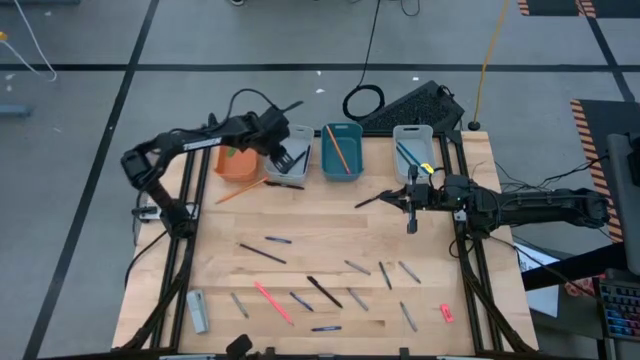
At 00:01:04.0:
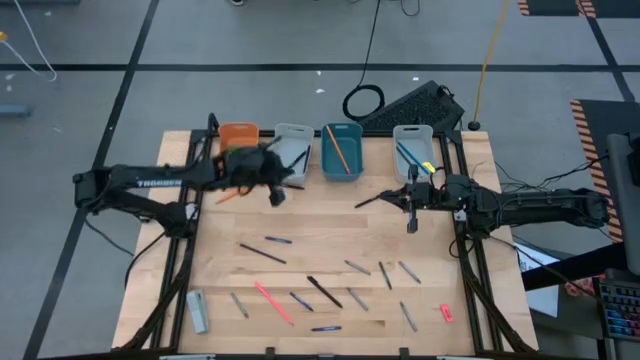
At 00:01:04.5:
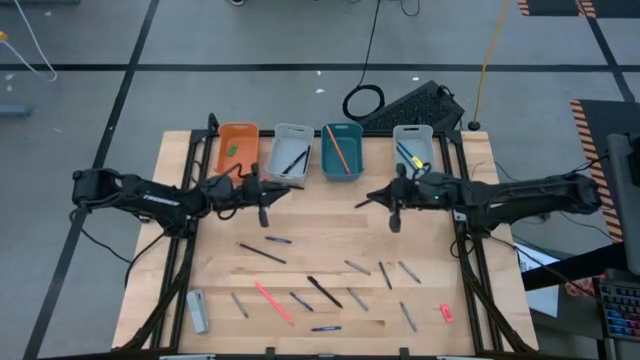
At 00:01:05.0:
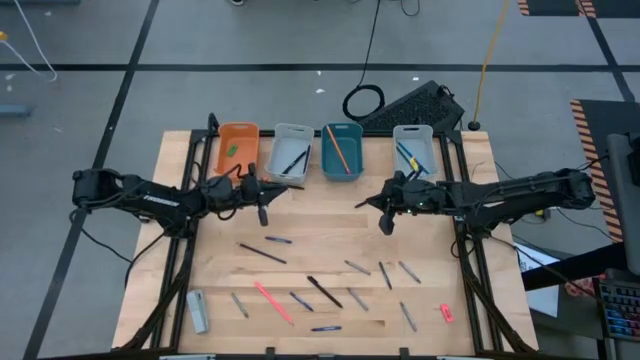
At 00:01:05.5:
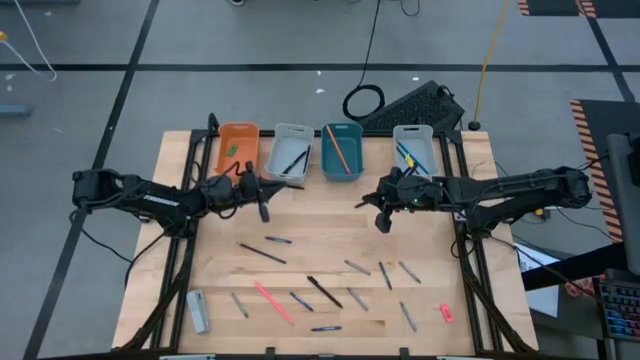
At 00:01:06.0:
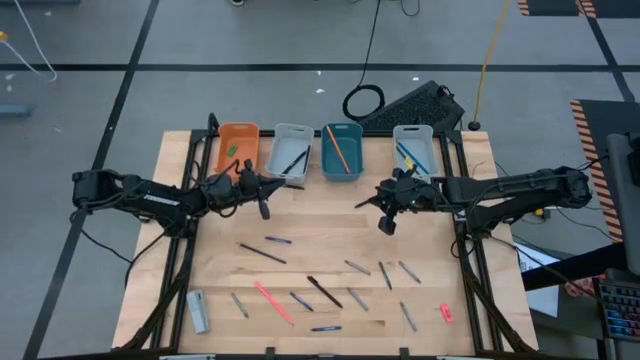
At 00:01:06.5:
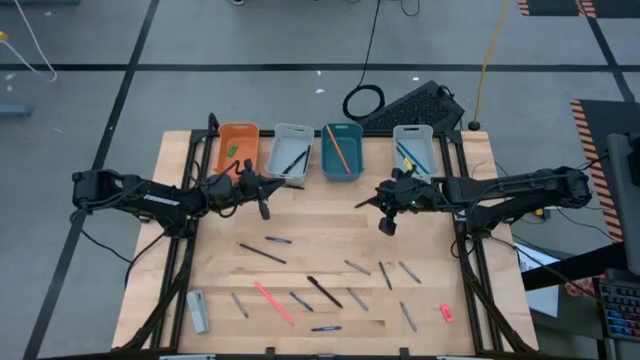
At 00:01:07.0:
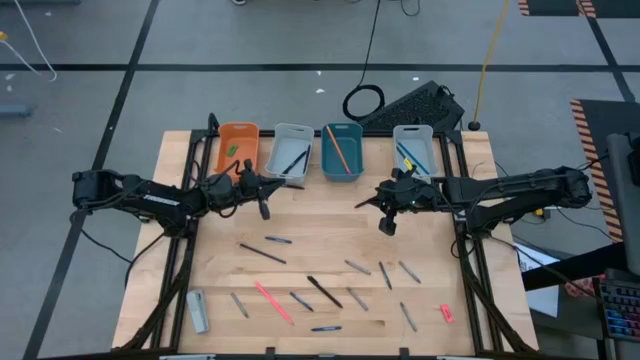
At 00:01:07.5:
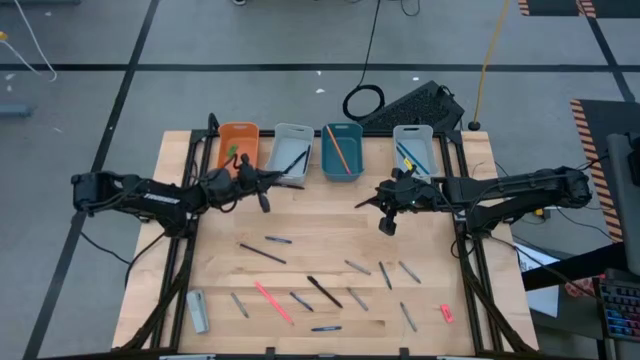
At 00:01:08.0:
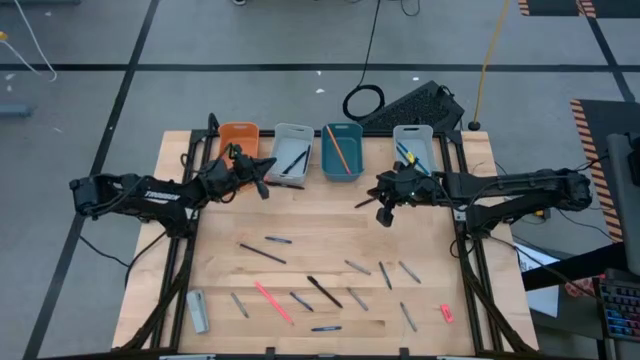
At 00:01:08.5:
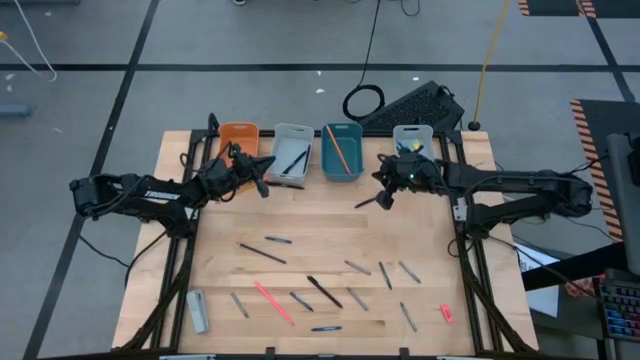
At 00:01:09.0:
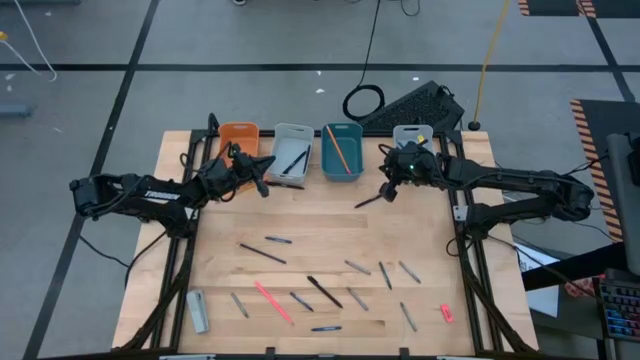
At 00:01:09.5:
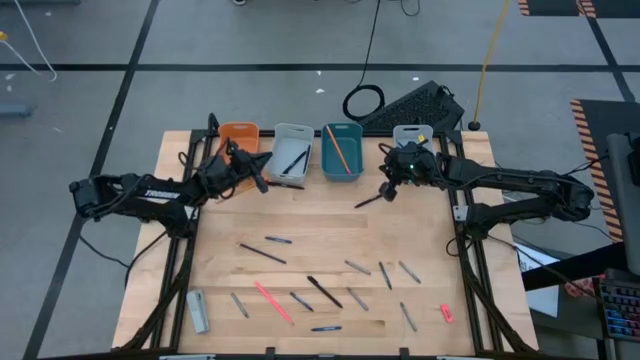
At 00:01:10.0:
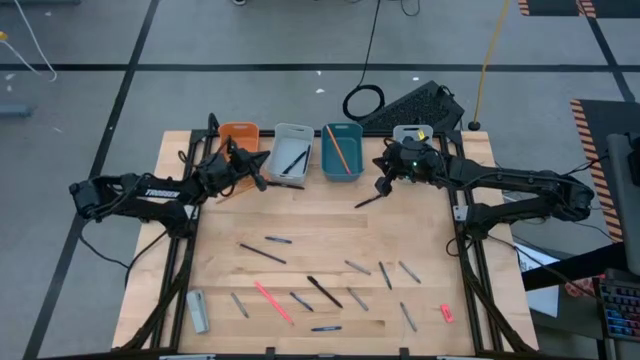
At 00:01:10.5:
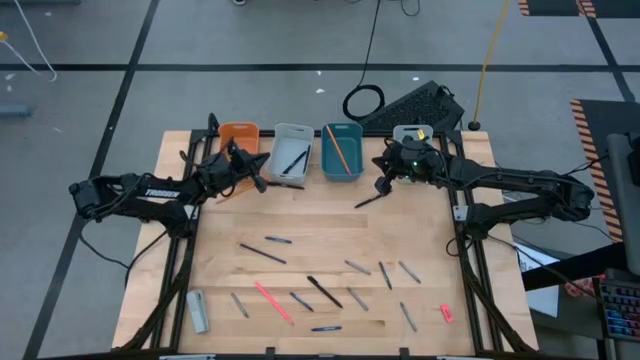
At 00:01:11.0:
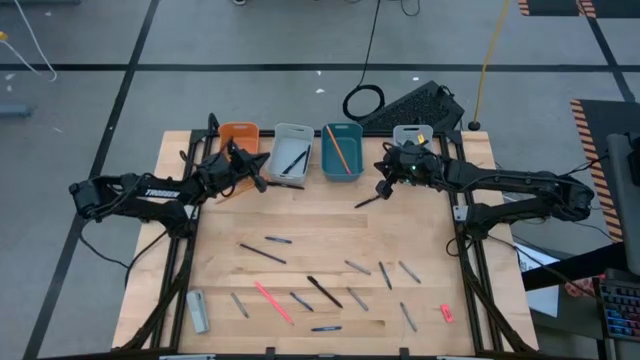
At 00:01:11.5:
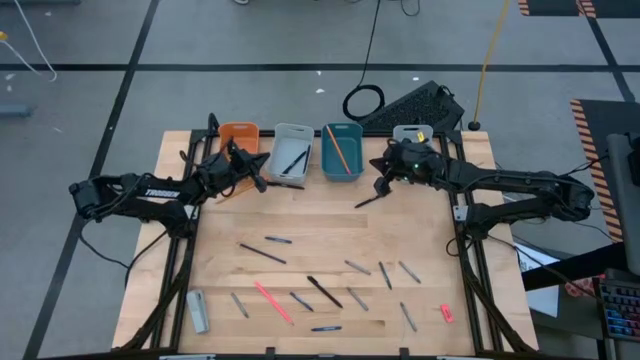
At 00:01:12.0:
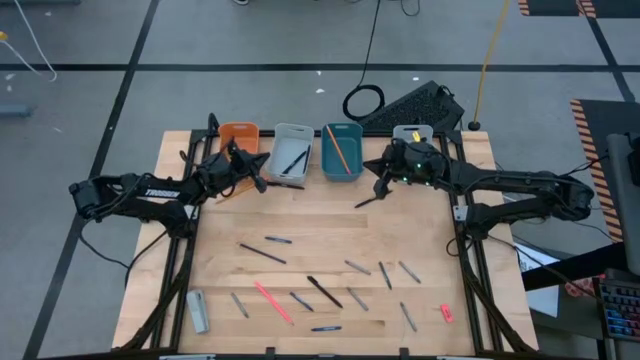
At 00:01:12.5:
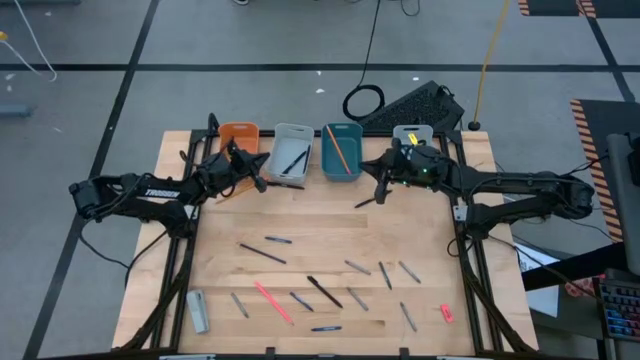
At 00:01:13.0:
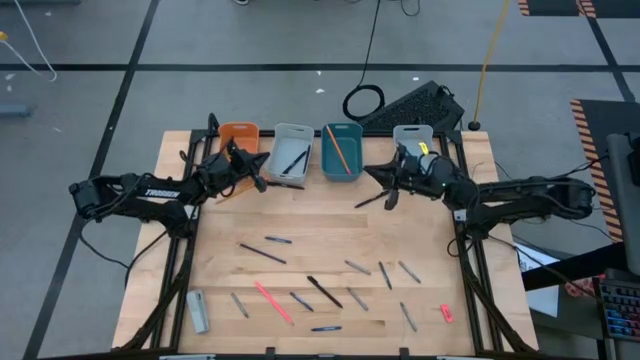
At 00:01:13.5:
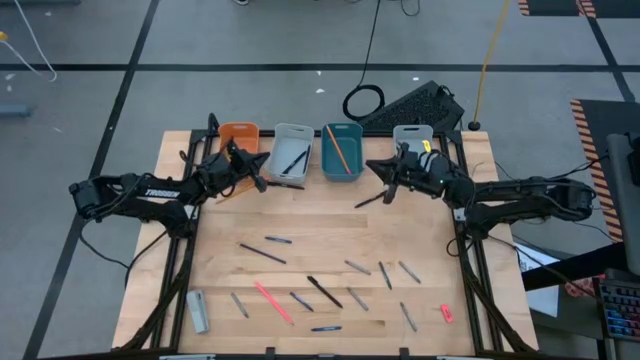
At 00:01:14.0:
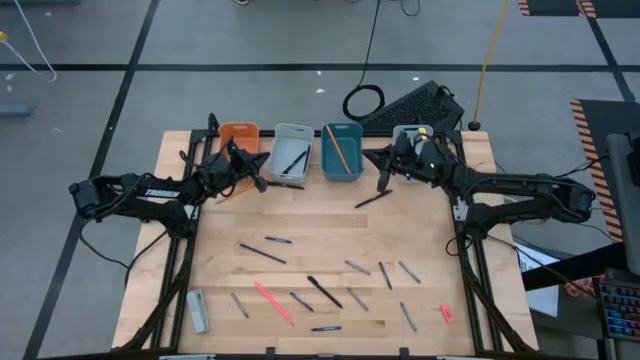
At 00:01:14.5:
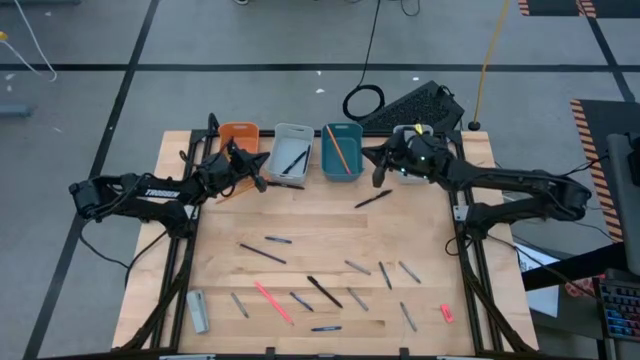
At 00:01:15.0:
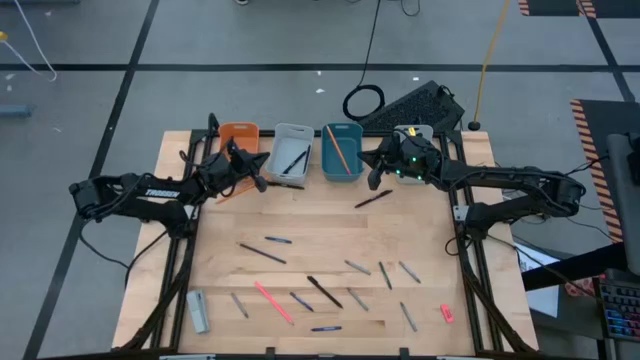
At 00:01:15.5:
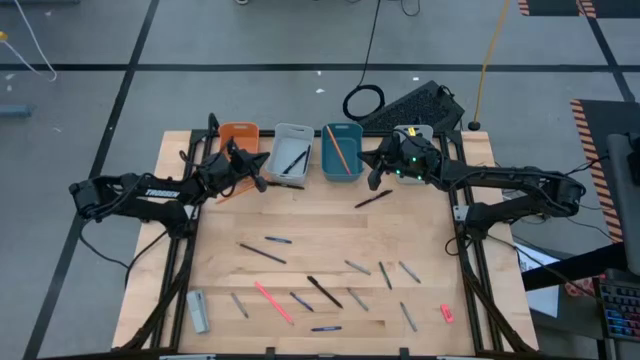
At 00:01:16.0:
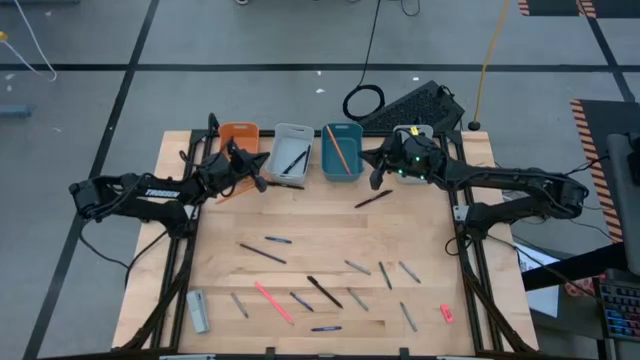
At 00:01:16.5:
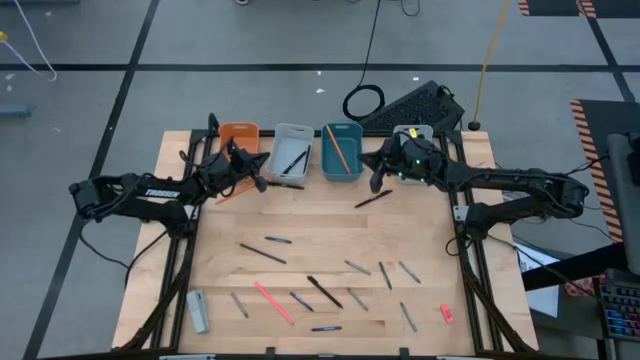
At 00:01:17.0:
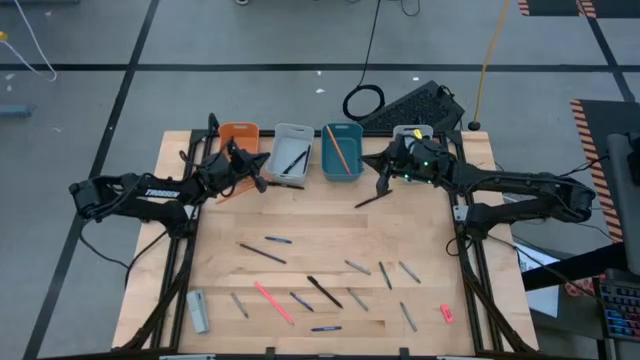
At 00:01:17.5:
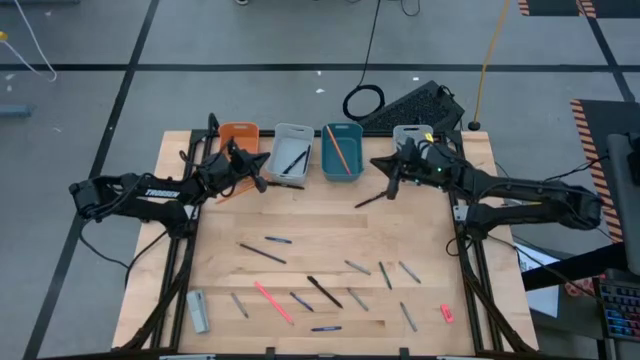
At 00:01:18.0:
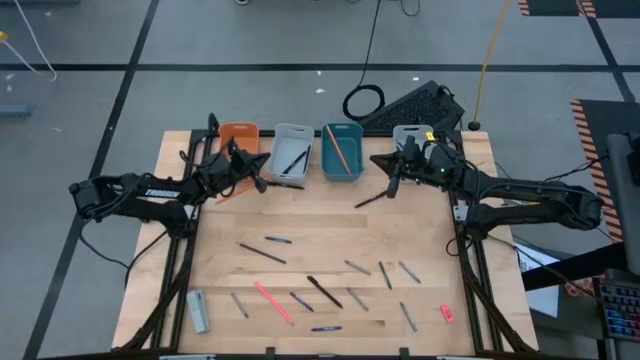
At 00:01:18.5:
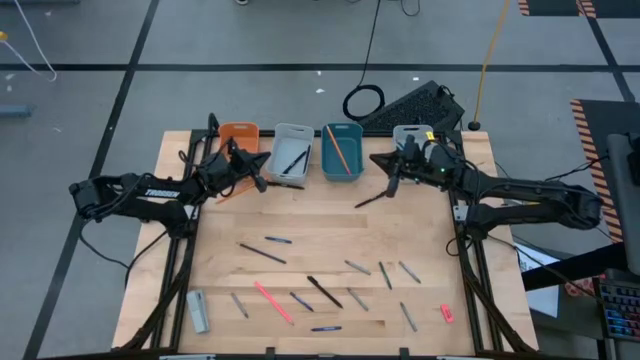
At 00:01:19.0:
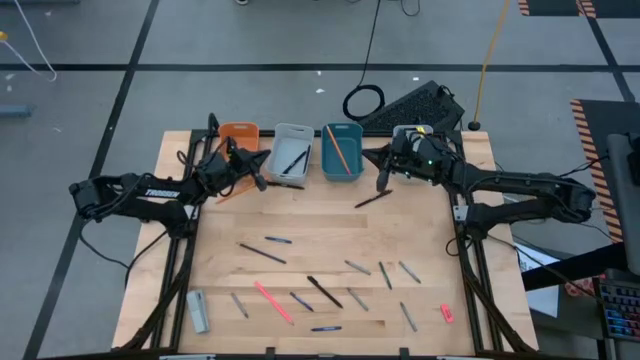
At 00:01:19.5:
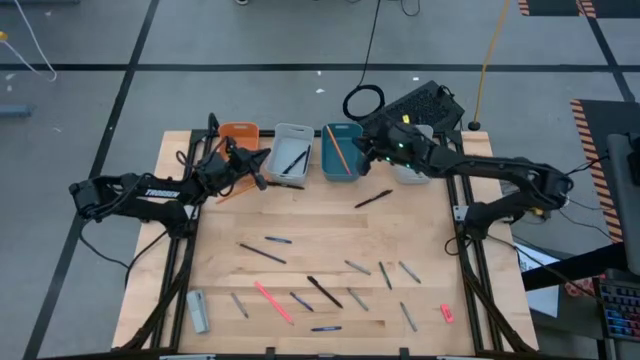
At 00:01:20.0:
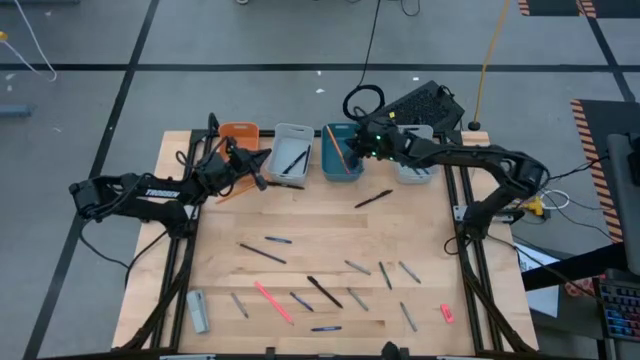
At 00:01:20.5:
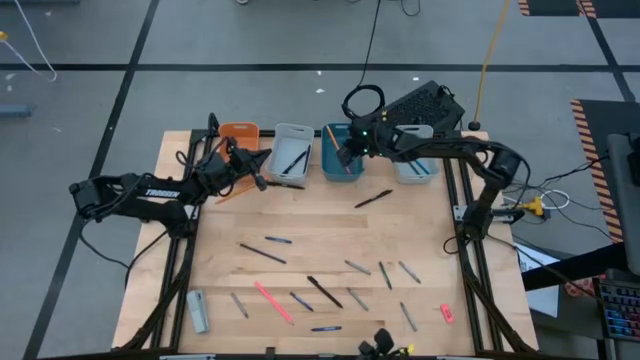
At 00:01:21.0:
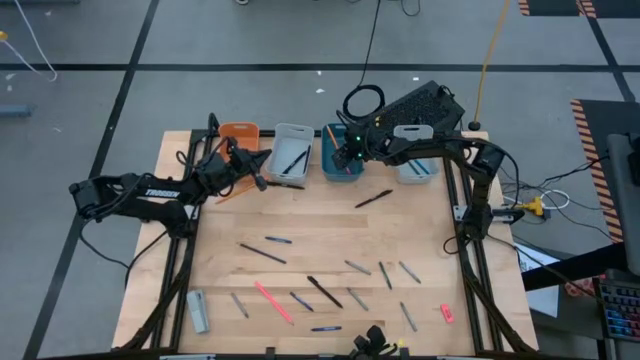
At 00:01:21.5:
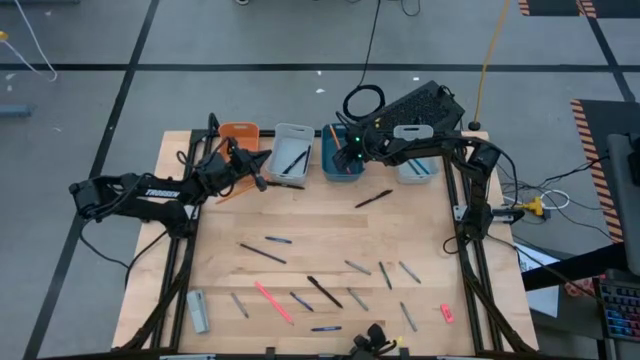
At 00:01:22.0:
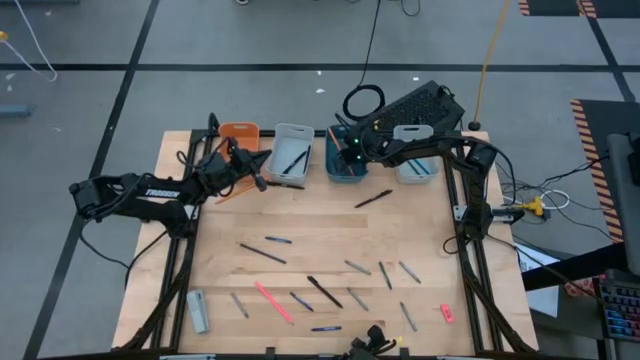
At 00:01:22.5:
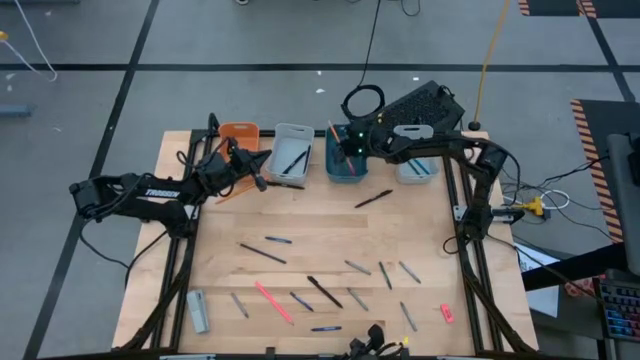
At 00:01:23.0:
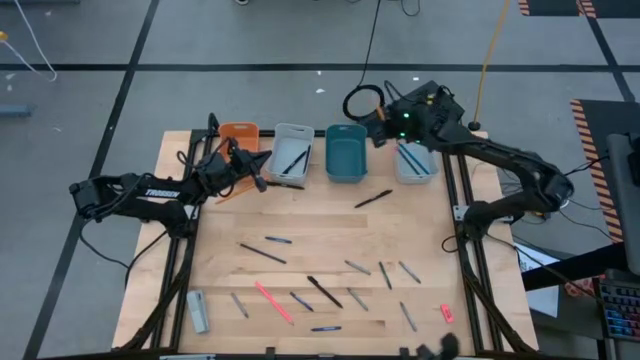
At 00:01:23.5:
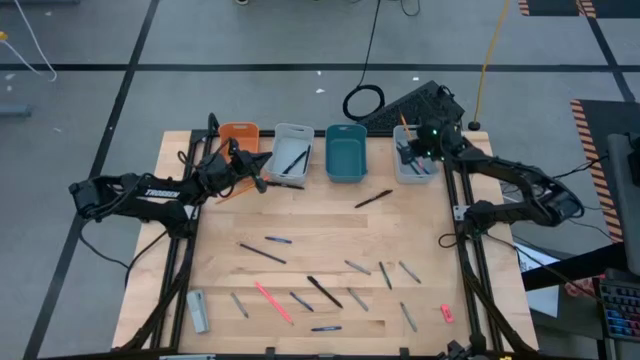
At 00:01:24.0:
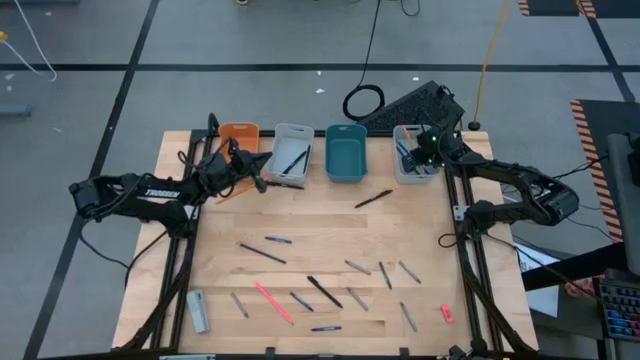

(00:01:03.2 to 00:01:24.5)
Task: Sort crayons/erasers/pens/pencils in bins
Remove the orange pencil from the blue bin
